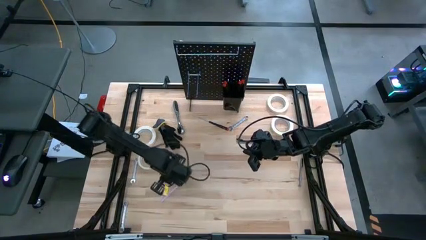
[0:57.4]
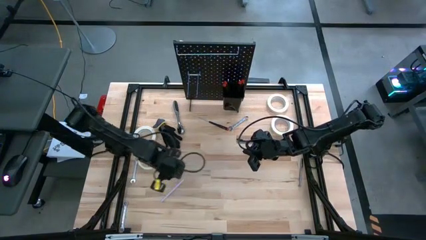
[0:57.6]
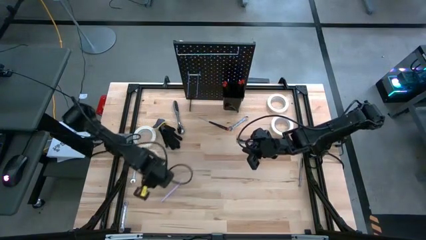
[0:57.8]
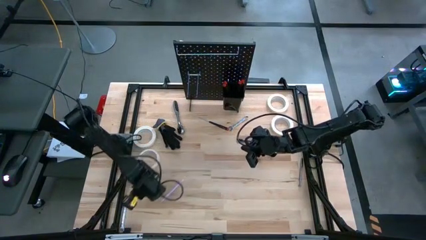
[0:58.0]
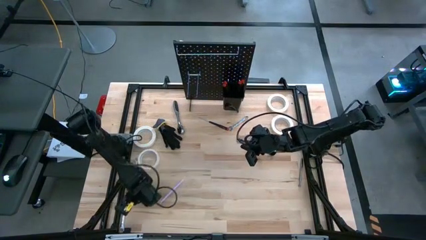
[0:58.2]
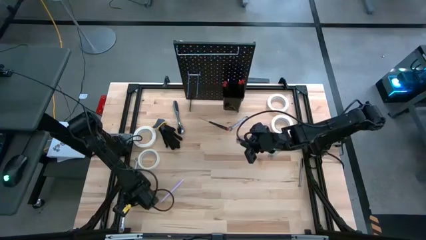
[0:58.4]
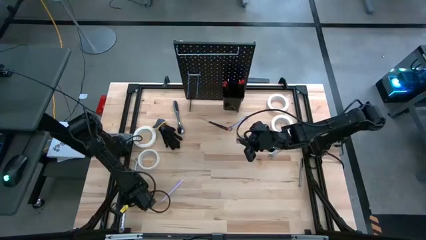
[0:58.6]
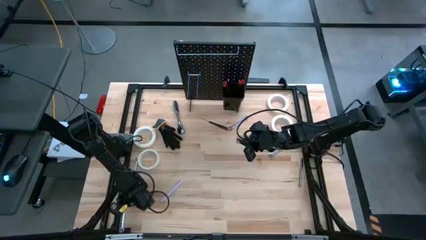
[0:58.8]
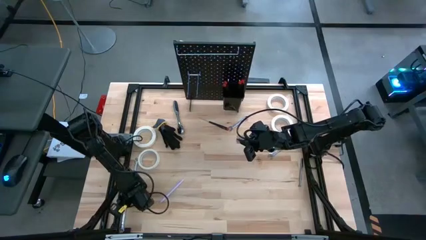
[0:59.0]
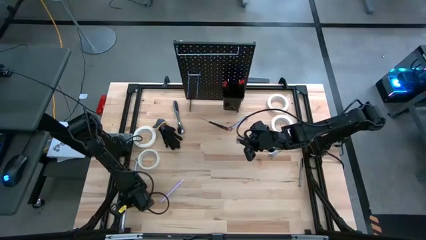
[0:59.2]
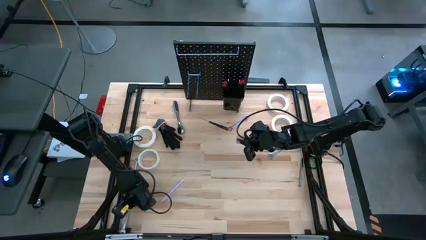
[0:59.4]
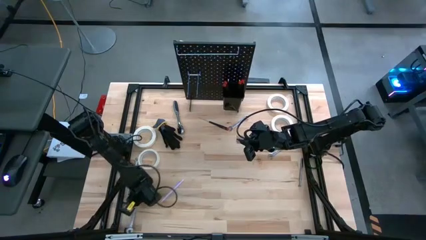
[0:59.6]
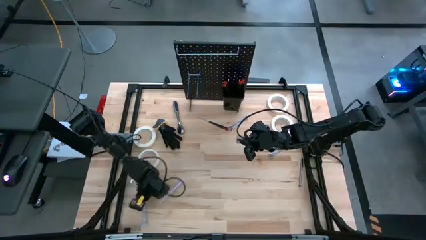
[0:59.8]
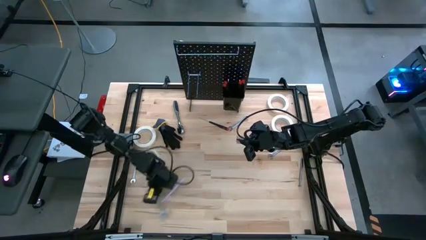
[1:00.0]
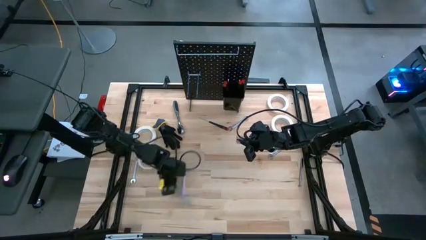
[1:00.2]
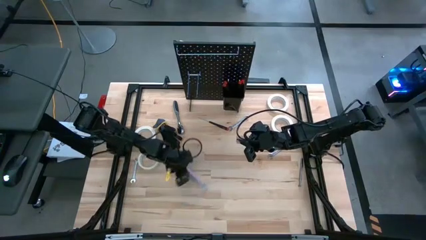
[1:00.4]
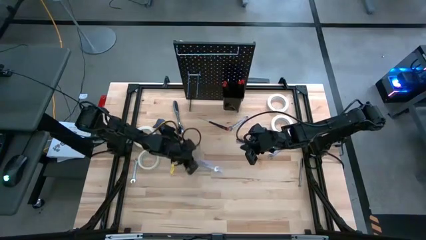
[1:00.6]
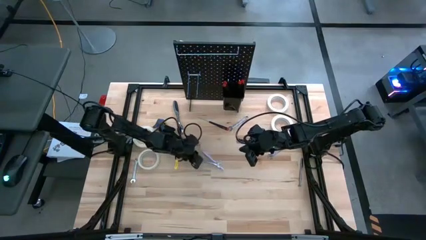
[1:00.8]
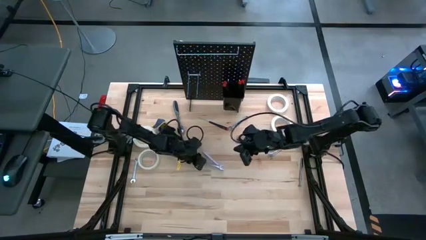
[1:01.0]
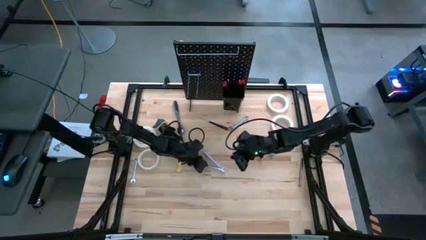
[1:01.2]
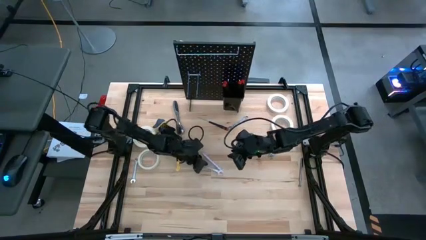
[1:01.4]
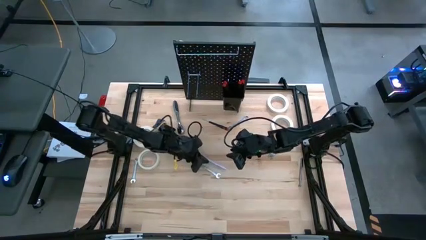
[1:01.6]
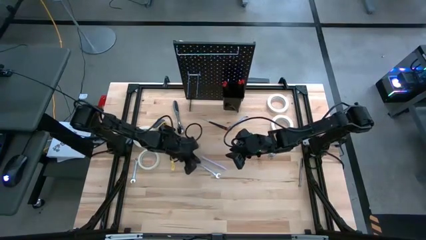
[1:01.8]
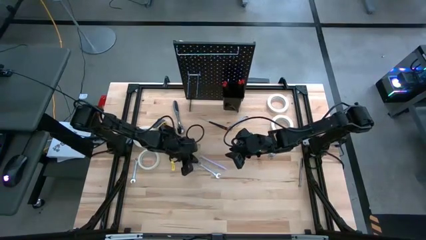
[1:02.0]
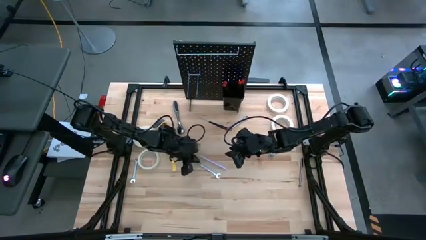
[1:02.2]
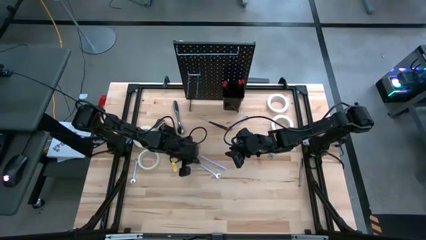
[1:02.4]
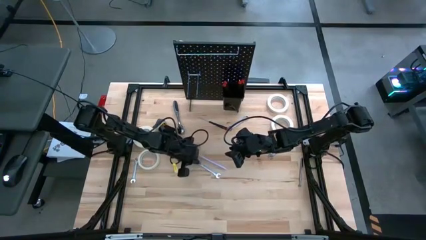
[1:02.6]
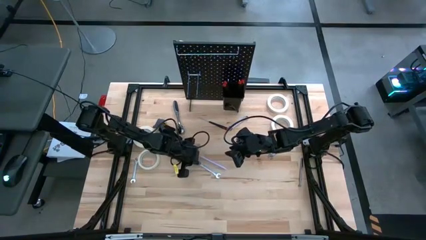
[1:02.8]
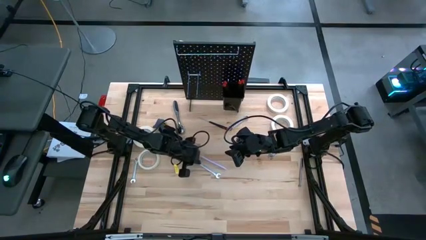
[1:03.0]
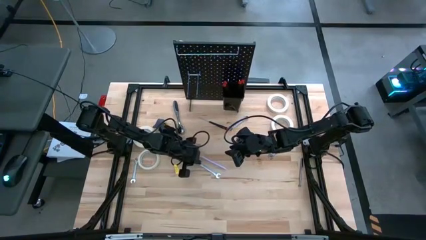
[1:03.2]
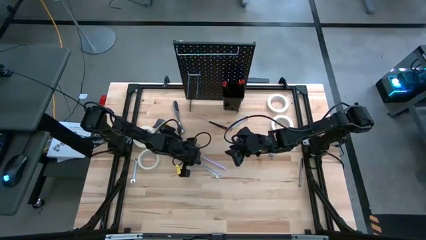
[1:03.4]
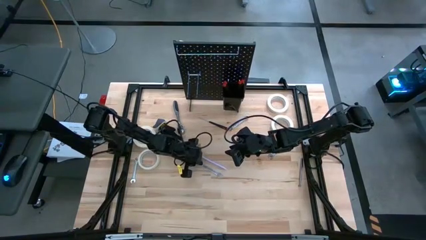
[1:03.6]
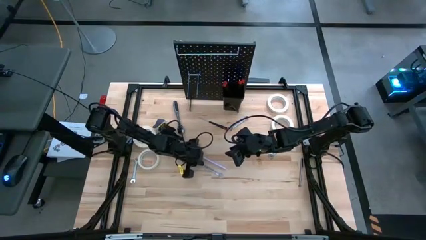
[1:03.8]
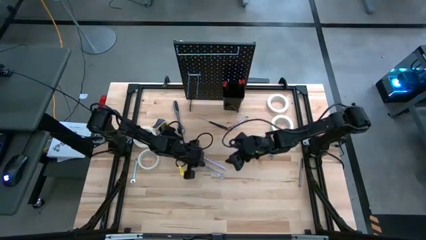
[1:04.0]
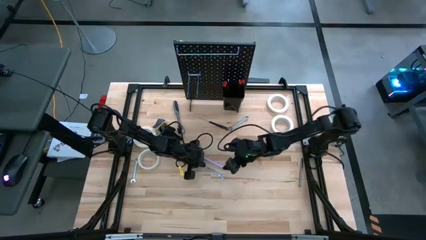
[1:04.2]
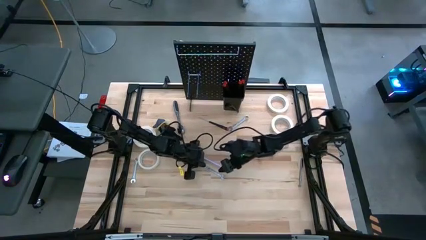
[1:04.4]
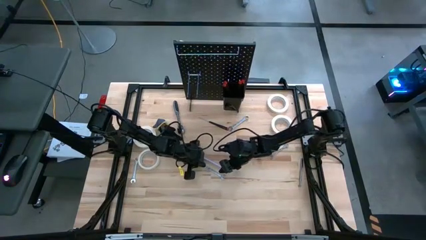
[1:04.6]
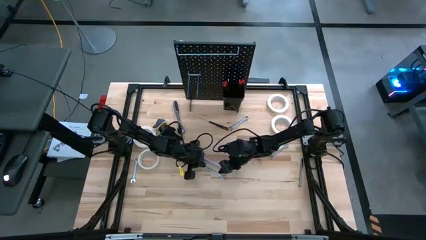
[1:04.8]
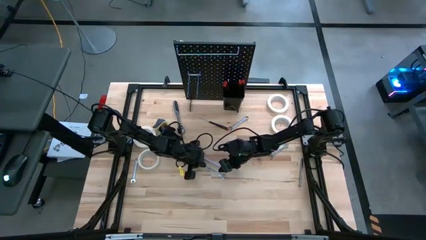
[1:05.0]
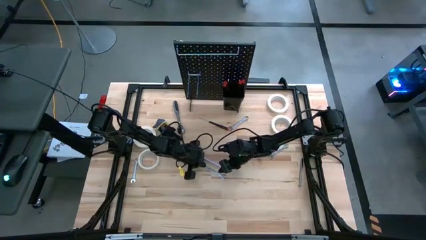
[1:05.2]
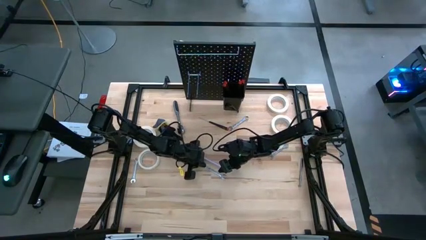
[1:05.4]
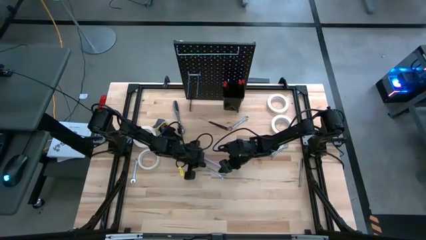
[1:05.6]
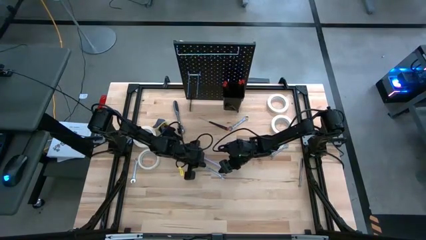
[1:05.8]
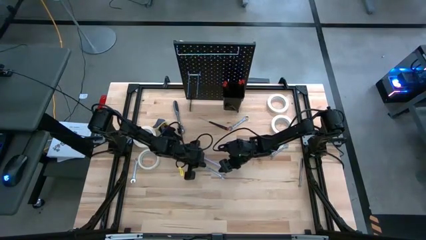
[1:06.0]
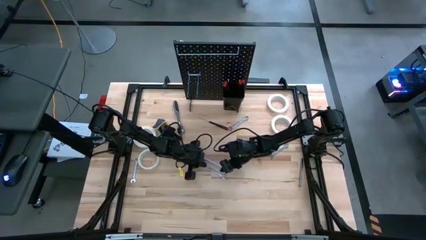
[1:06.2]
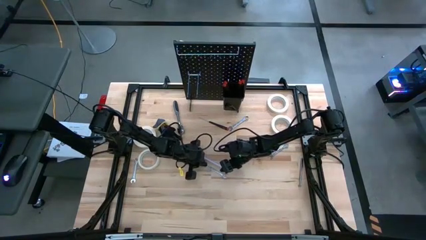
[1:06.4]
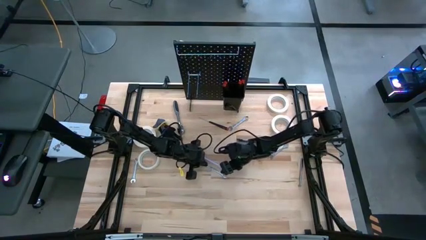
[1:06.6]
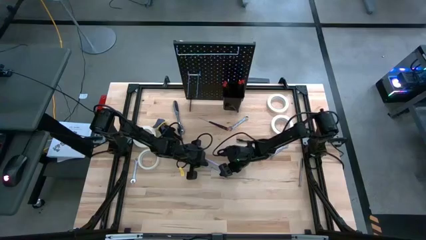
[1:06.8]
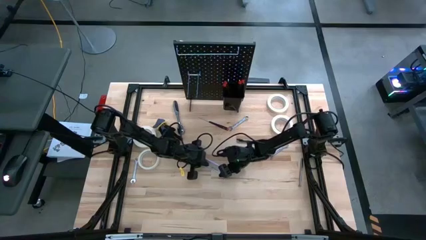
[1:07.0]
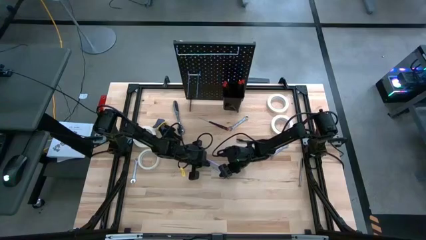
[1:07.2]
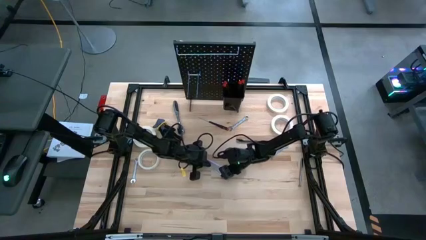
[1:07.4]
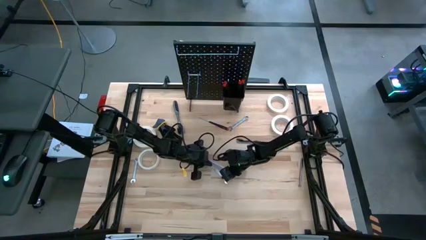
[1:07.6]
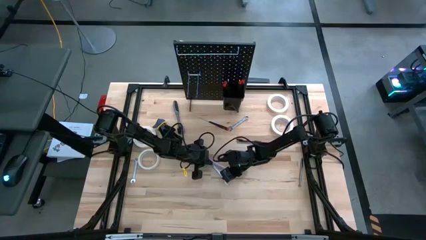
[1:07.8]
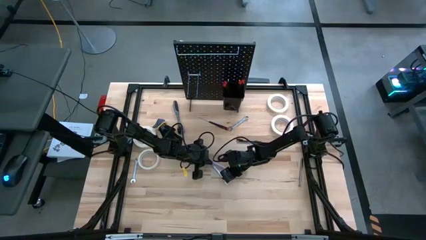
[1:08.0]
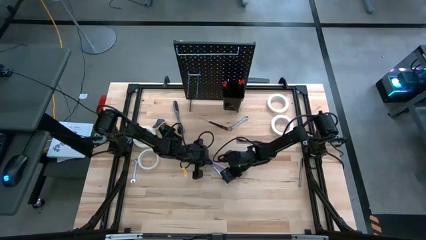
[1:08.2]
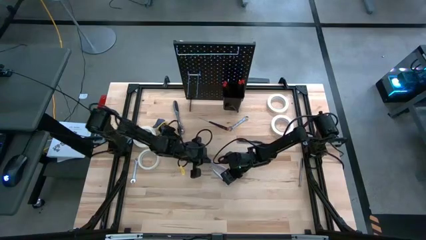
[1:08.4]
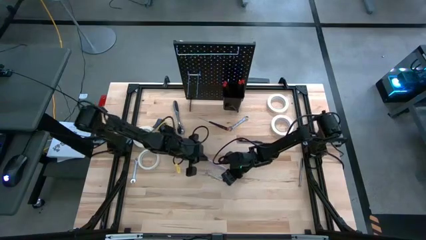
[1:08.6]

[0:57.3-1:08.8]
Task: Hang tools onto peg board
Hang the wrench onto the peg board

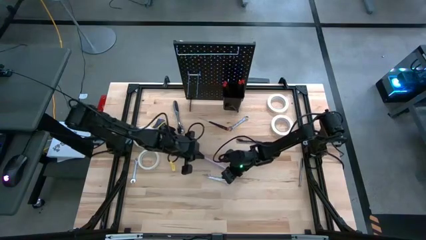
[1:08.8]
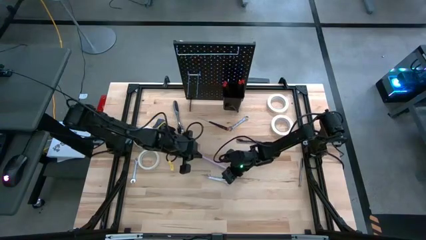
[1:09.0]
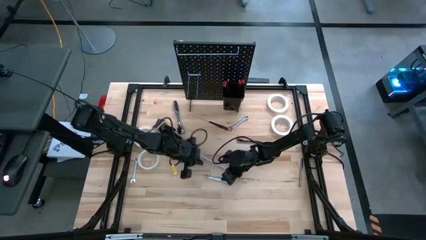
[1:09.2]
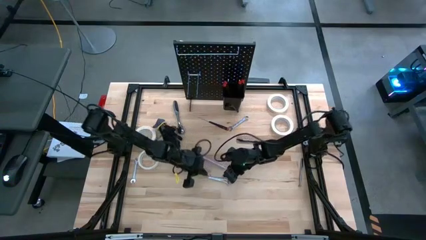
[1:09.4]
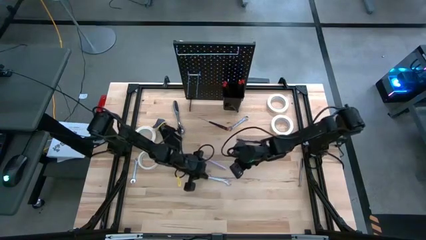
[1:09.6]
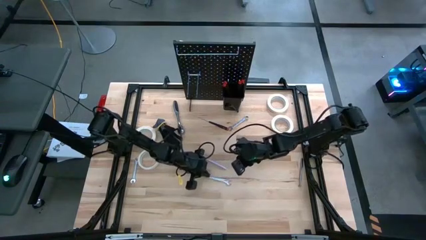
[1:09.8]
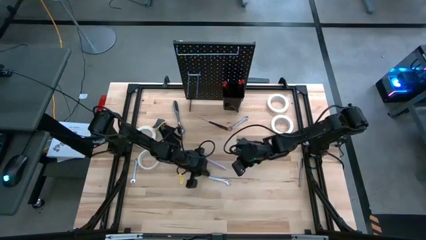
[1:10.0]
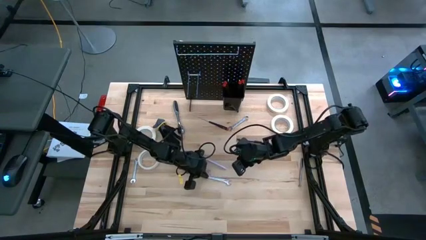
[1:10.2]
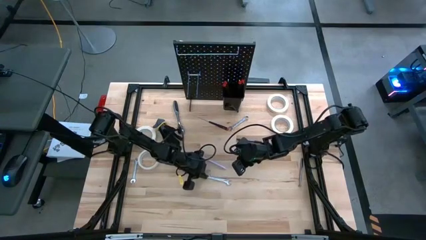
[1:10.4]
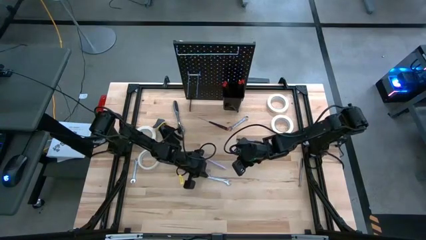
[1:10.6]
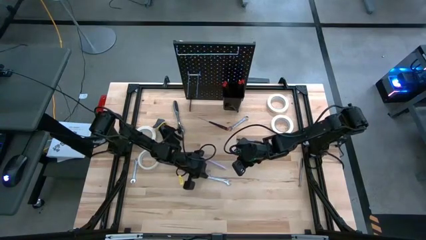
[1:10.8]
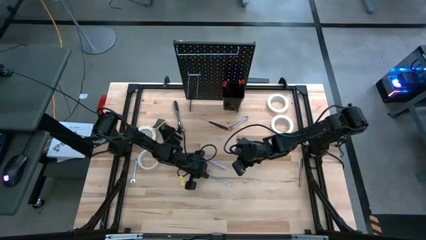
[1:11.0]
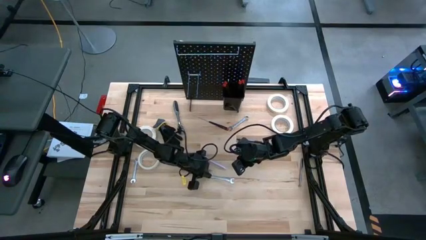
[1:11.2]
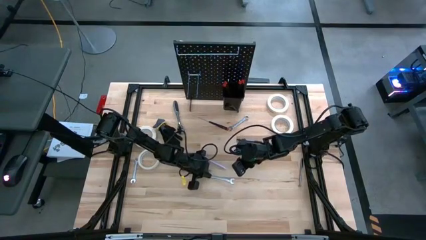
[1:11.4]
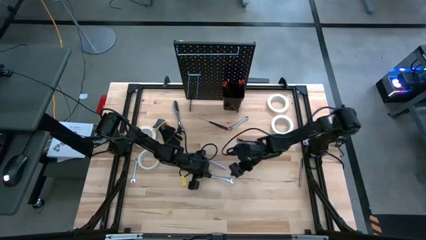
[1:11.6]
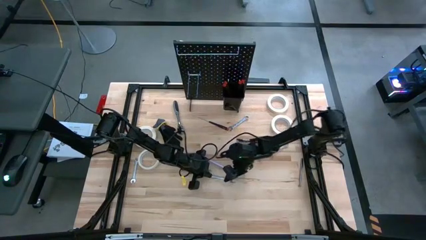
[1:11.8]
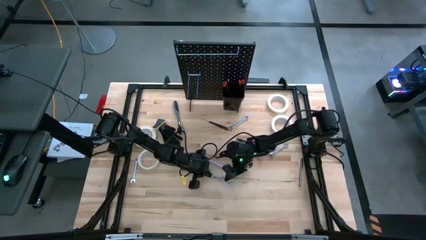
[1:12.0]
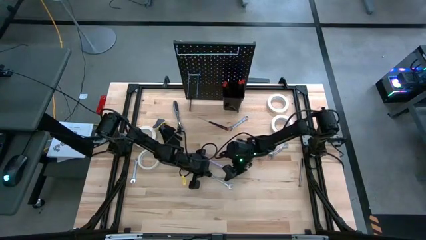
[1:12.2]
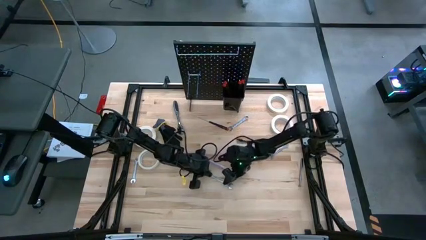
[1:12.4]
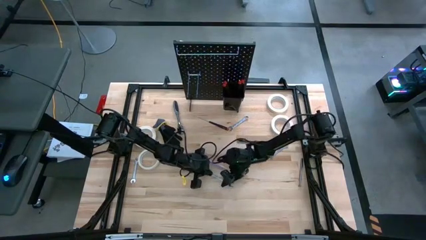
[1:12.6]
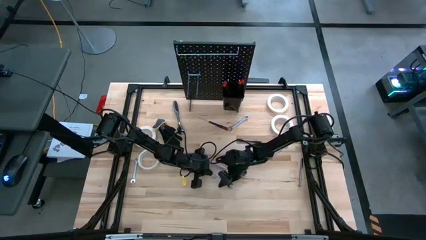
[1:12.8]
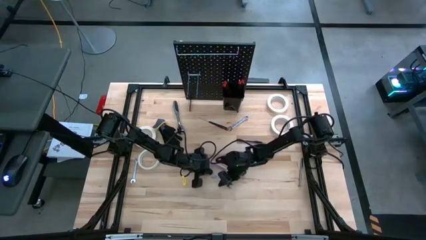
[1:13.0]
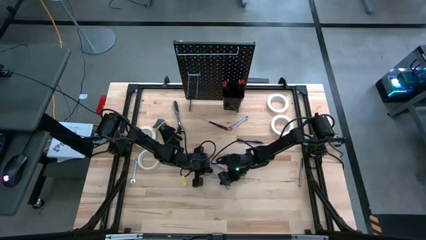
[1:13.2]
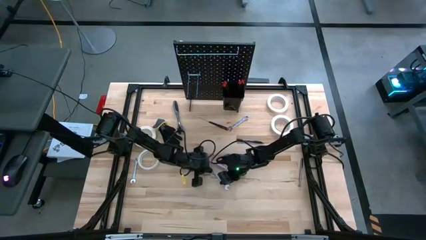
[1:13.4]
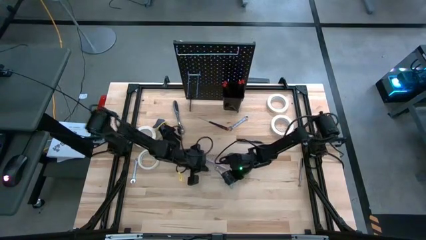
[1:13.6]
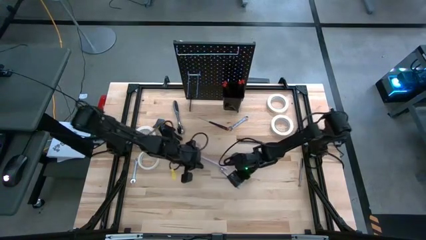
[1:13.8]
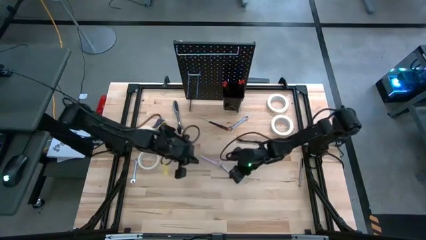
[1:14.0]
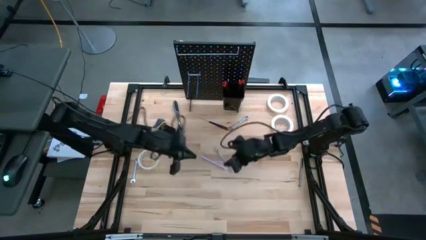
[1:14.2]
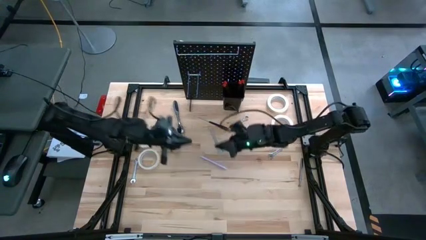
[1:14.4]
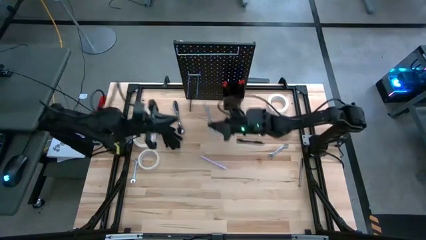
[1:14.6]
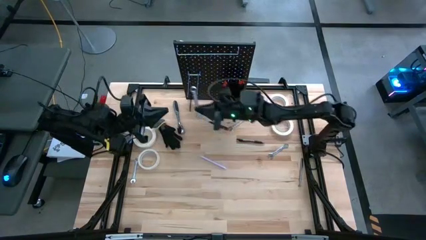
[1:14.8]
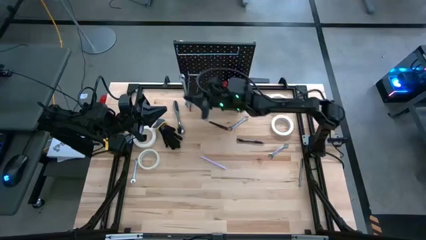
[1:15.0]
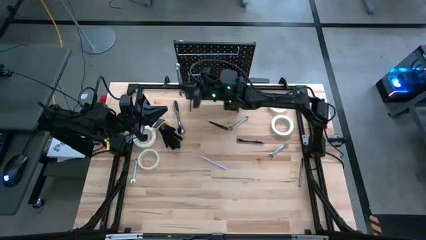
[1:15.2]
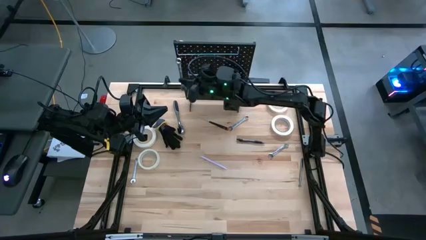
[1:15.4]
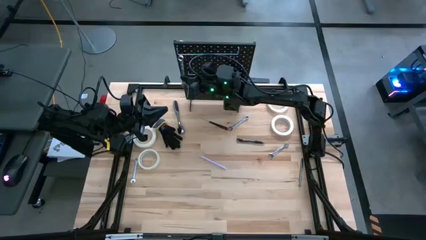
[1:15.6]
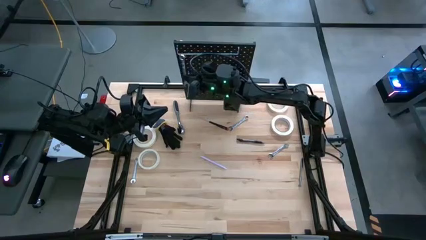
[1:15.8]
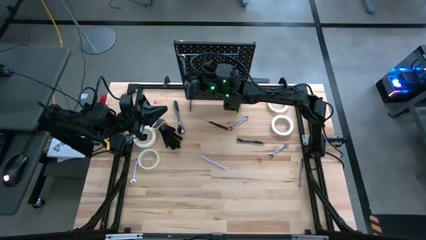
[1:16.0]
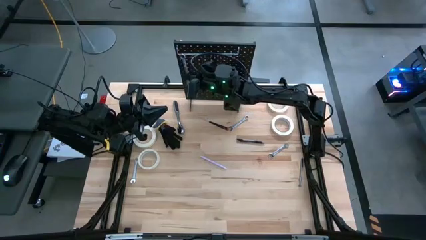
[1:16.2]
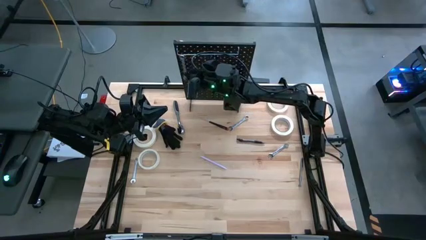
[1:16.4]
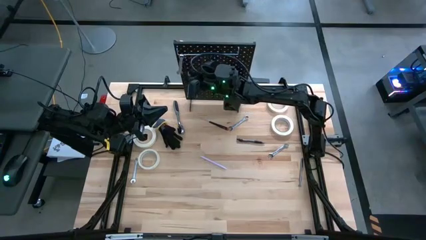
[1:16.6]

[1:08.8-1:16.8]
Hang the wrench onto the peg board
